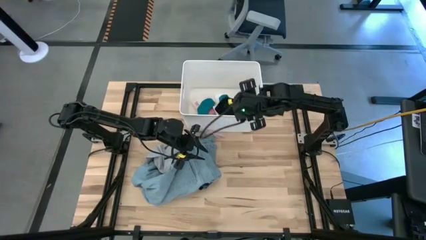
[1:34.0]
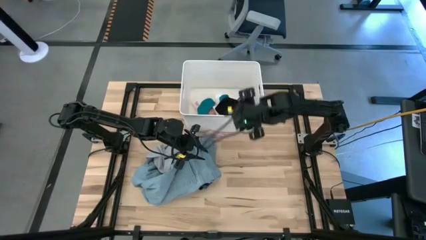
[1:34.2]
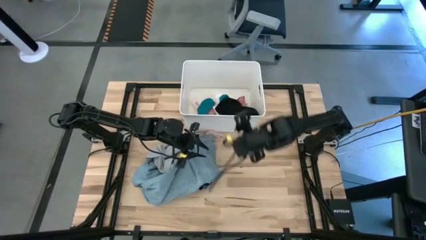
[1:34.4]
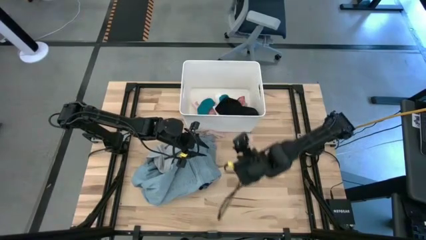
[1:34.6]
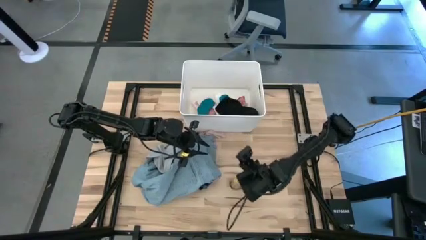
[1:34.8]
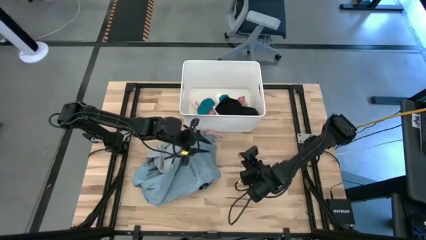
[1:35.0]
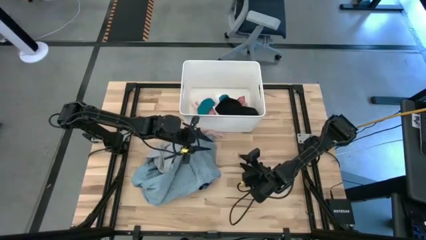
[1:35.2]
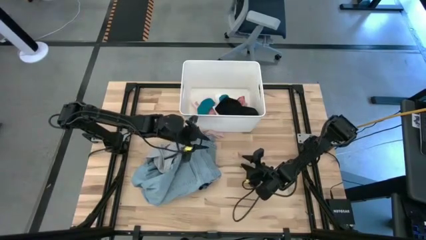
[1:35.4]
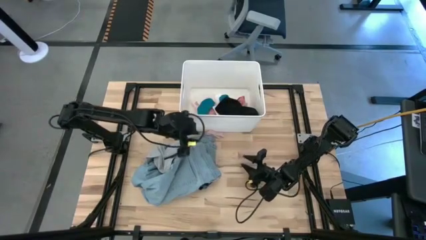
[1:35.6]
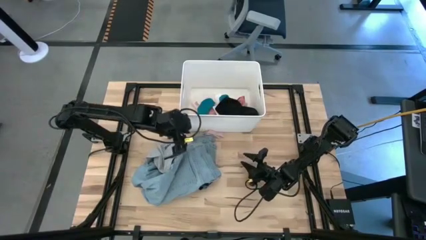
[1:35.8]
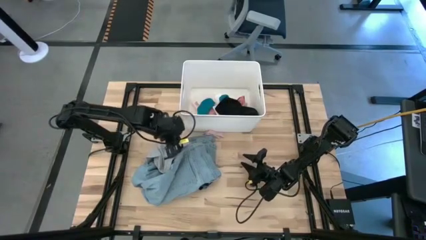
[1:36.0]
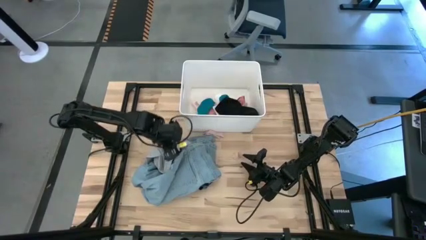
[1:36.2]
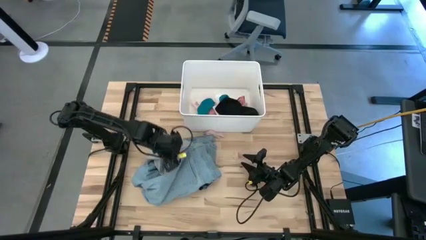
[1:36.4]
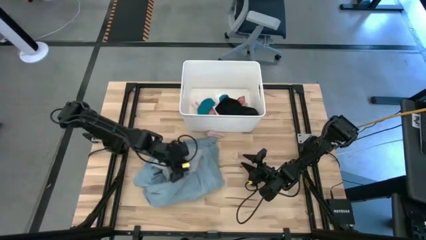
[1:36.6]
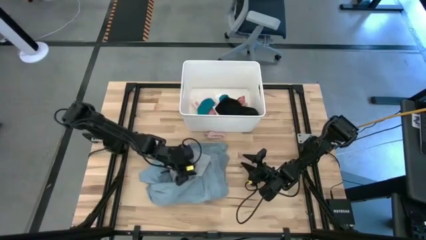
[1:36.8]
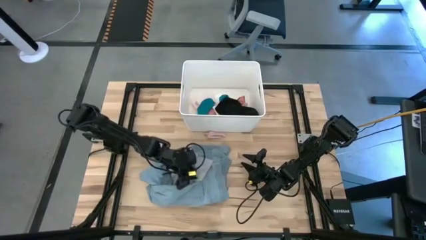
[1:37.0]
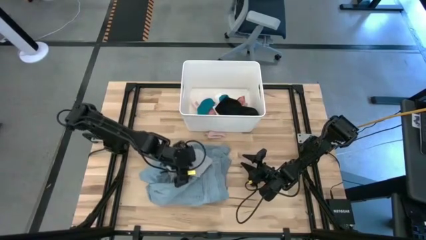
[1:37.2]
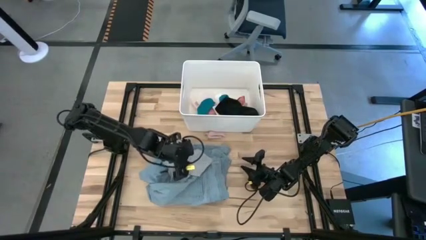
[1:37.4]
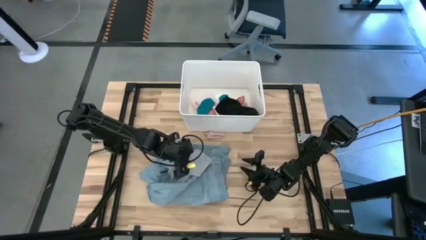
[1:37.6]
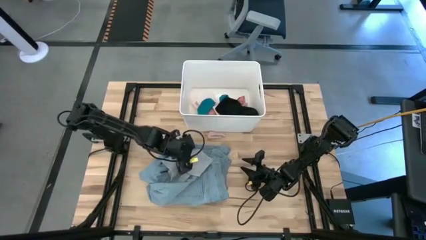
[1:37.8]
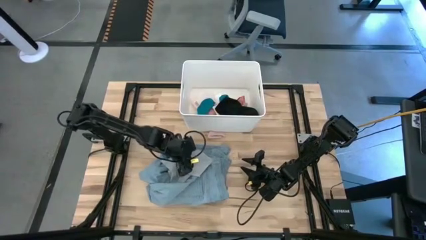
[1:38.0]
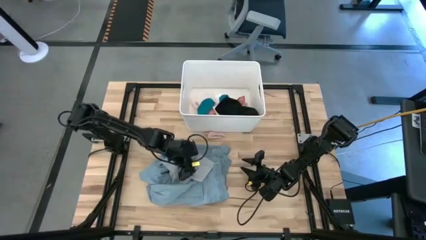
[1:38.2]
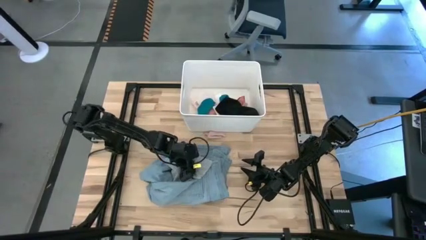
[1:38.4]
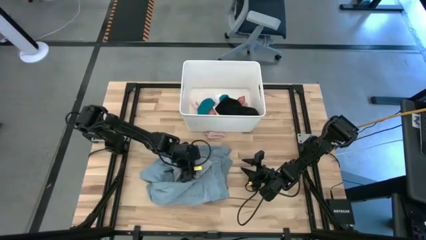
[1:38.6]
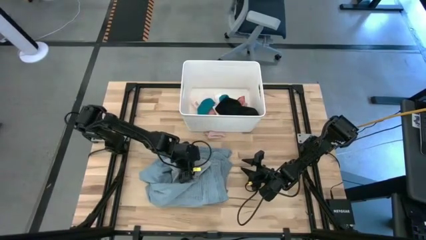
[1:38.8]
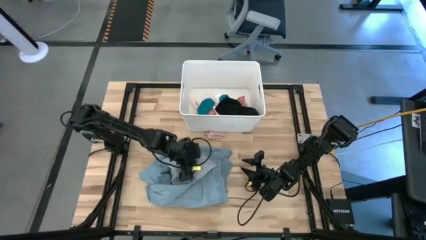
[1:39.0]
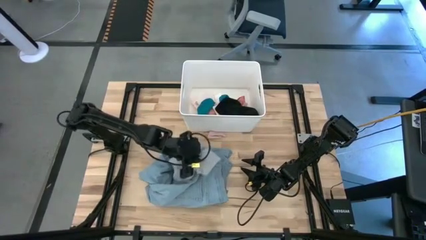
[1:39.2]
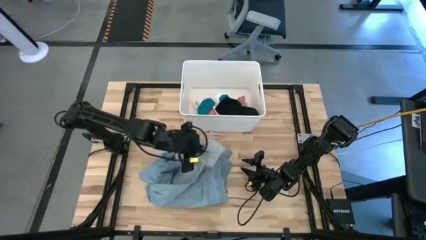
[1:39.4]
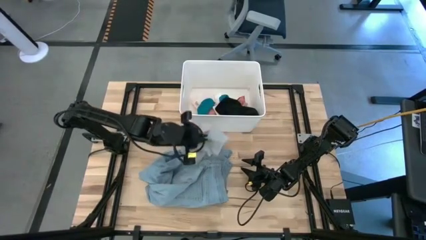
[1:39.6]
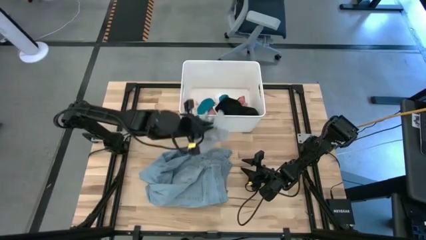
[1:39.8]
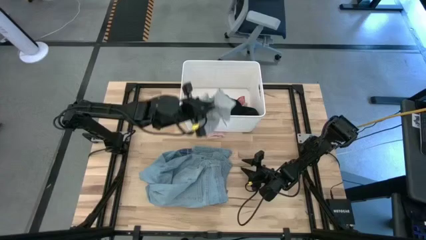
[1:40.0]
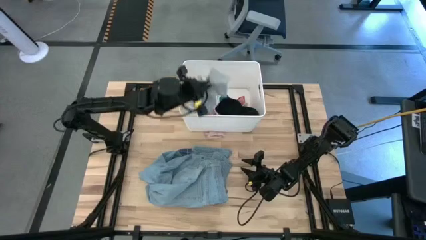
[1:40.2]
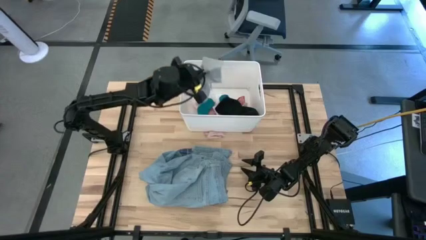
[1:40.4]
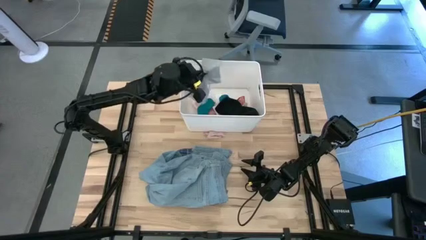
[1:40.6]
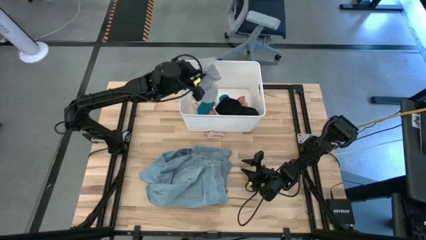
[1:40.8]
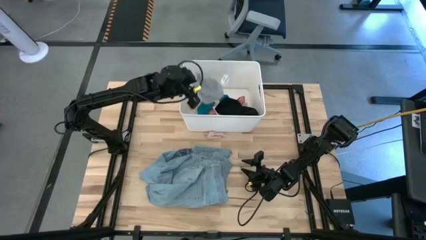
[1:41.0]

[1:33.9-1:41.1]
Task: Sort clothes
Put the gray underwear into the white laundry bin

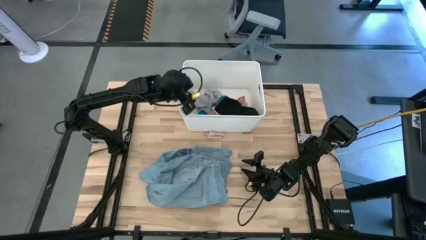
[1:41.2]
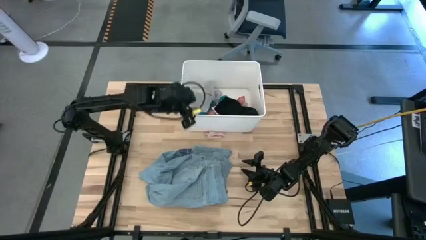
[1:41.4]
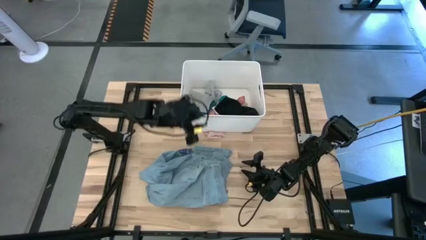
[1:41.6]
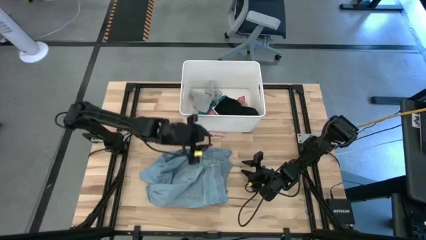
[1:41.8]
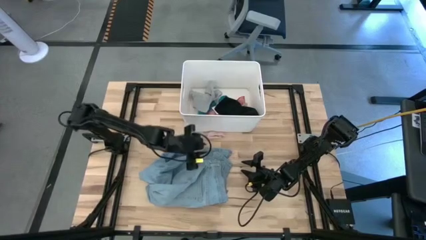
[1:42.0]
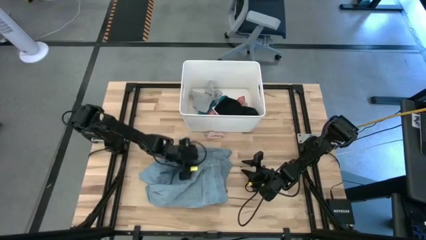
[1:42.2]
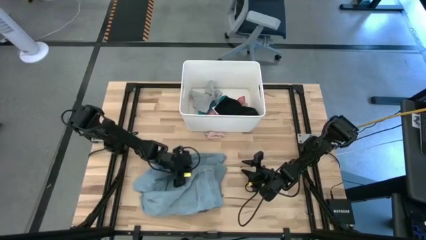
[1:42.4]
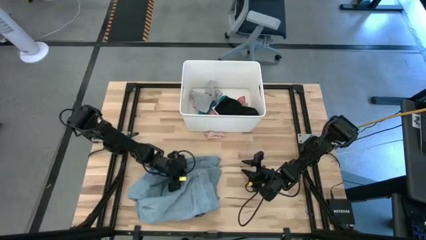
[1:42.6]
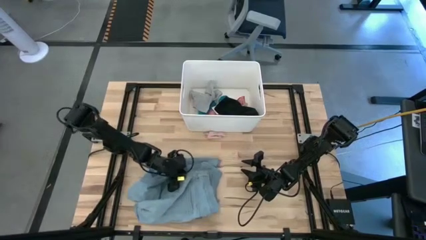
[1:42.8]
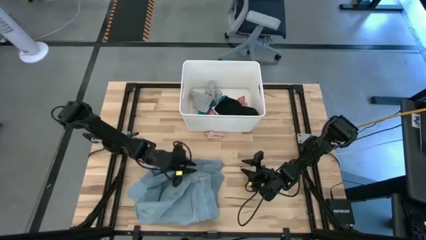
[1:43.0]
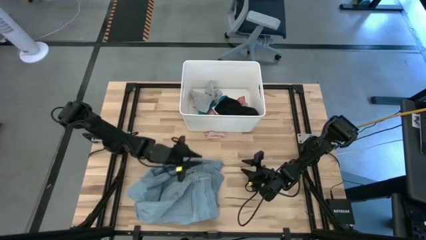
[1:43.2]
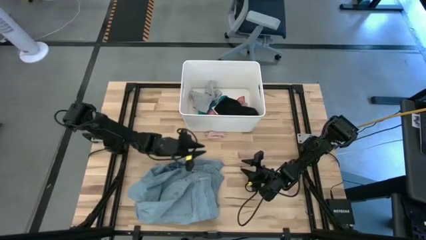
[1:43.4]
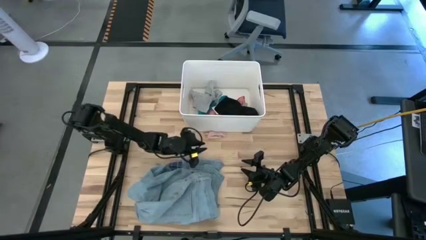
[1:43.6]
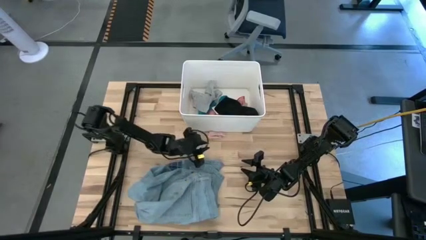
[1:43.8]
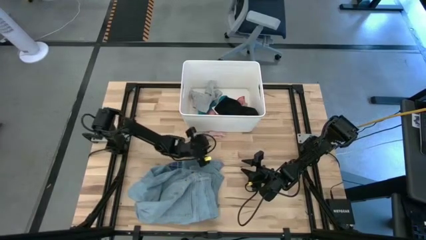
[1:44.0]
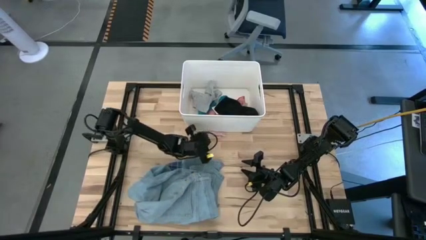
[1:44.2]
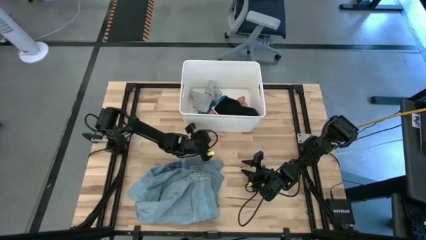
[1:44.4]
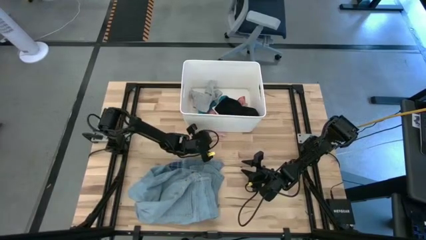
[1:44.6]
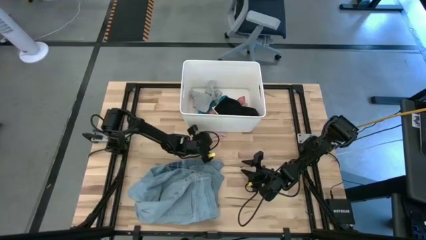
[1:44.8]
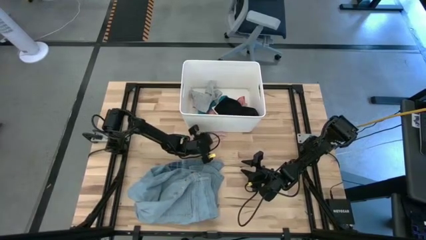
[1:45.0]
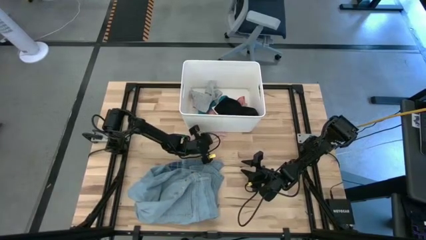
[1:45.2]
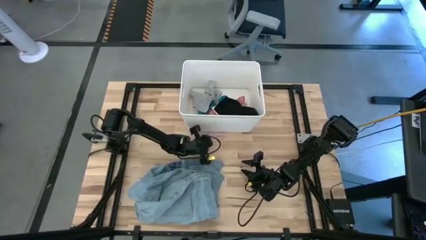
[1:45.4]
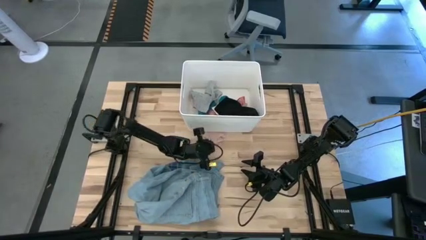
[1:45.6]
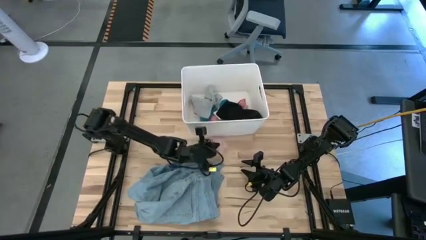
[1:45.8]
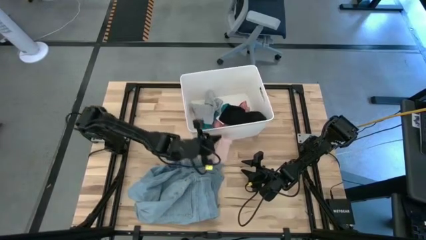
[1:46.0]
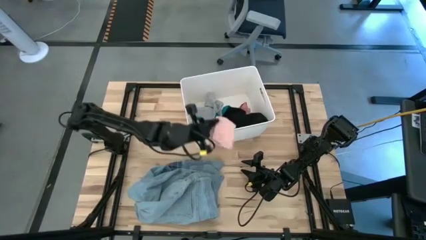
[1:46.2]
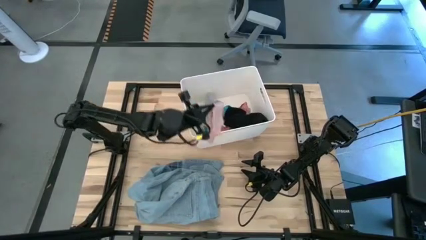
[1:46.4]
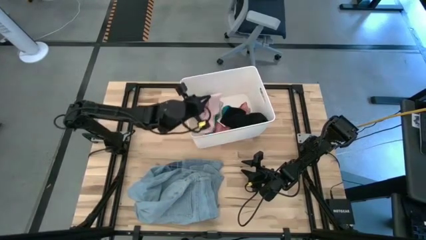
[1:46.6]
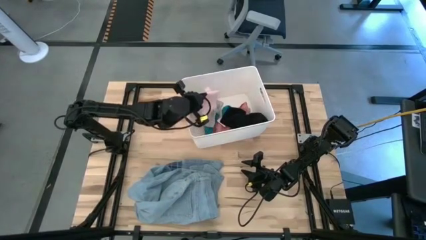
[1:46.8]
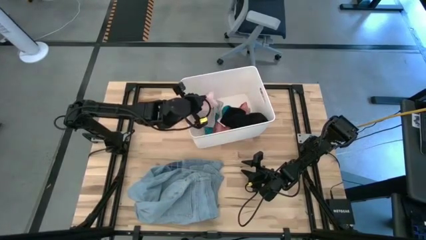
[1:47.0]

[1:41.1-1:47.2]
Put the light pink sock into the white laundry bin

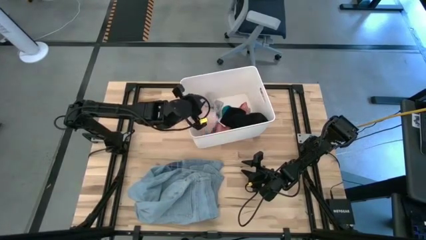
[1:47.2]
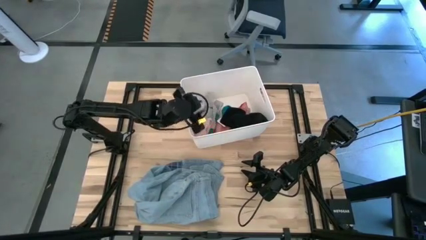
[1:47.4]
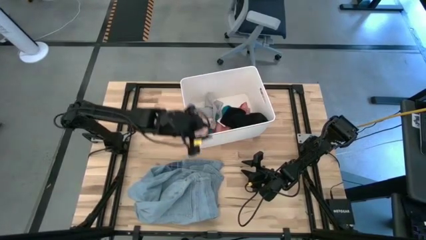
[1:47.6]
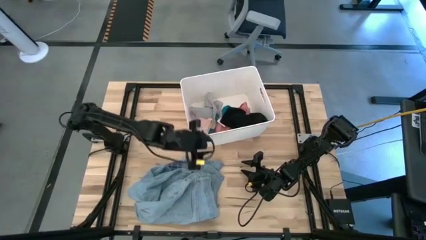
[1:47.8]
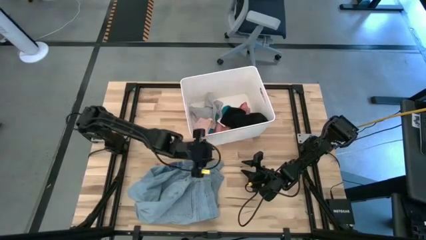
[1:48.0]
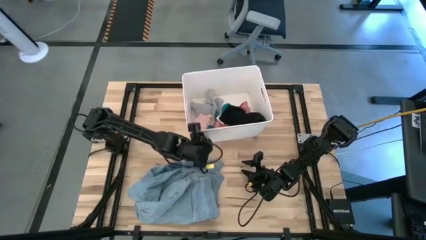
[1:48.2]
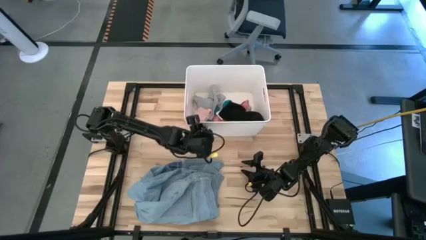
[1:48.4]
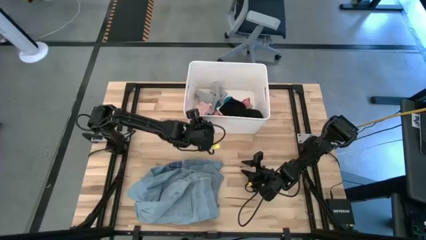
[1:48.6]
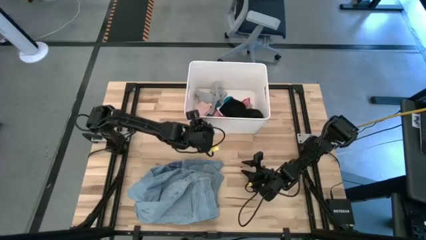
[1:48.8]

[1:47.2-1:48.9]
Adjust the white laundry bin

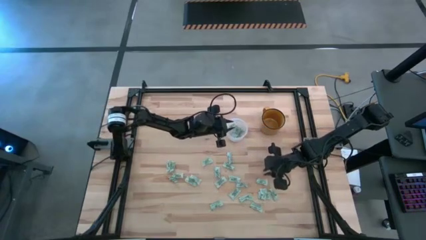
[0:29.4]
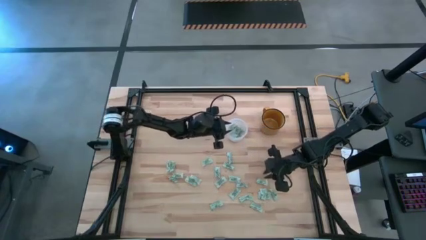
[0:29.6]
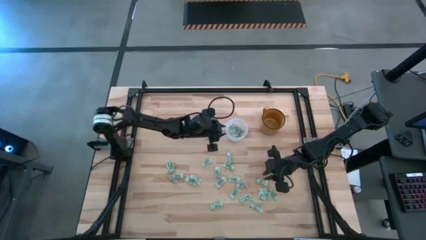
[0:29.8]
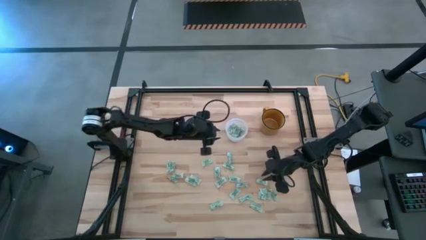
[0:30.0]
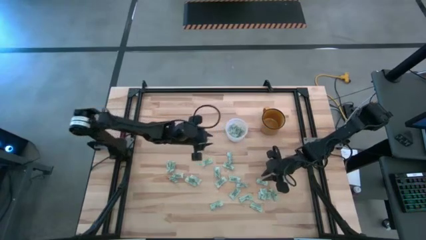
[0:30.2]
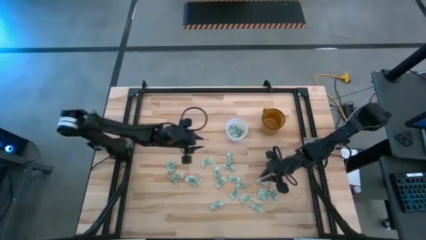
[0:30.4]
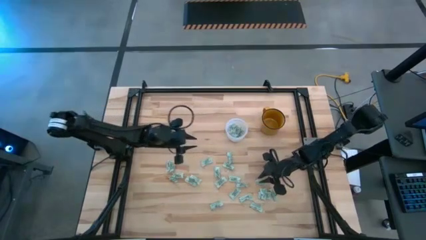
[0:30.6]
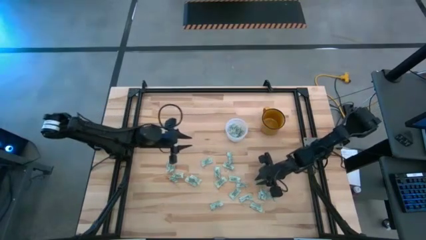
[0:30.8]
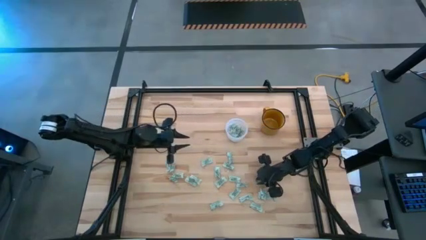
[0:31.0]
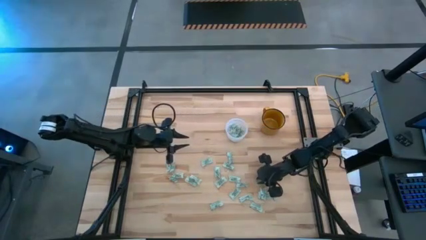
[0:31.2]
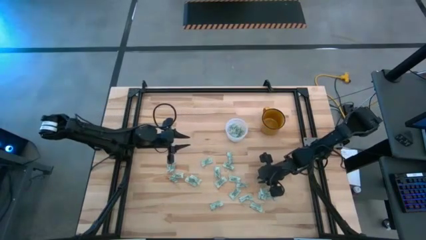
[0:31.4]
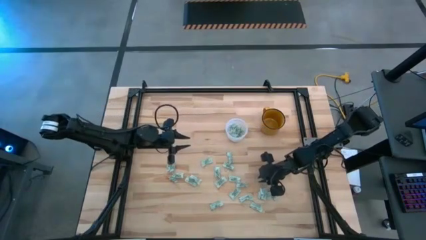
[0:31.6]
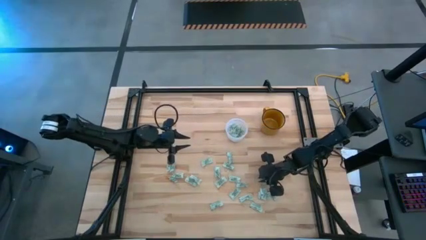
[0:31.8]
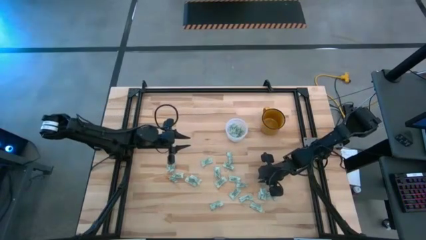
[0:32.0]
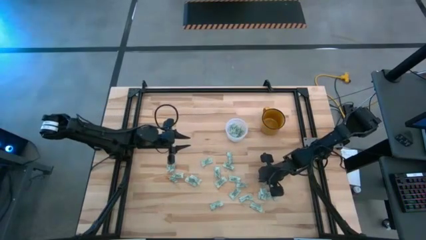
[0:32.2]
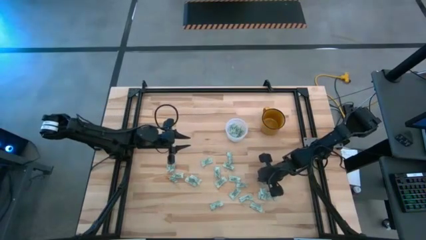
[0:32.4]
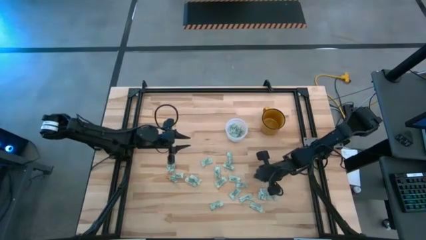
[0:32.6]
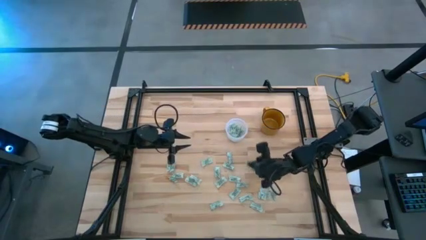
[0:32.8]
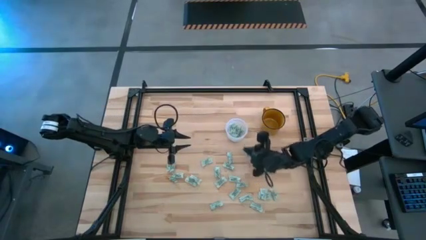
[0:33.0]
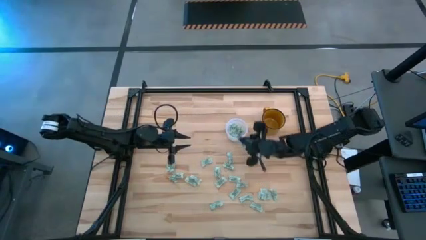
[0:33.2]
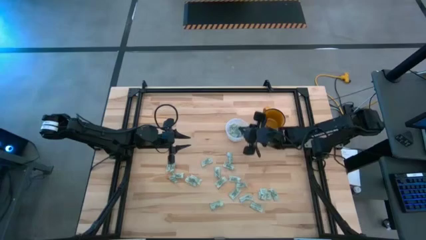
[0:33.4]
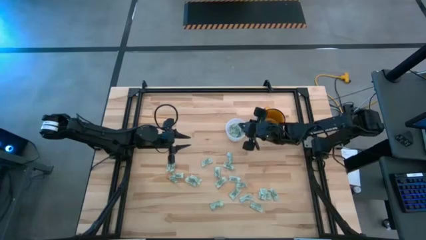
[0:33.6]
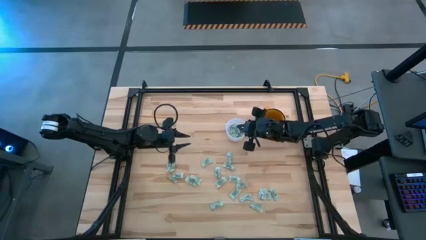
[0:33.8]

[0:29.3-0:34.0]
Task: Pick and place Stevia / Truvia into bins
Put the green stevia packet into the transparent bin
